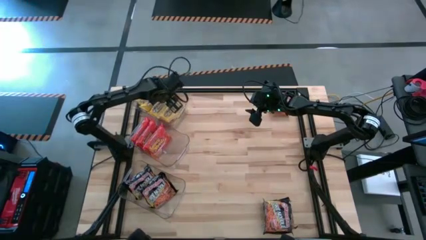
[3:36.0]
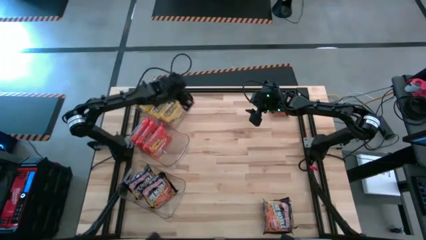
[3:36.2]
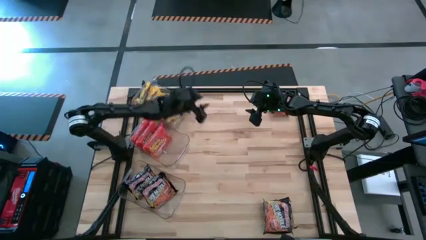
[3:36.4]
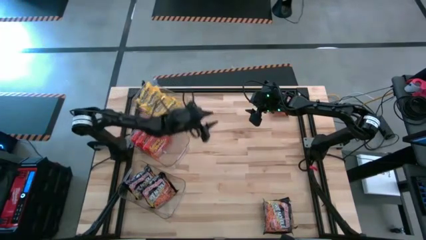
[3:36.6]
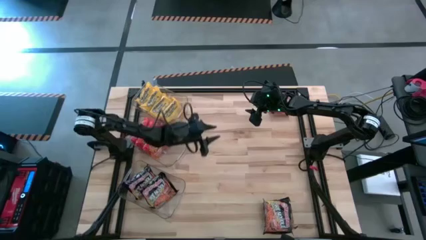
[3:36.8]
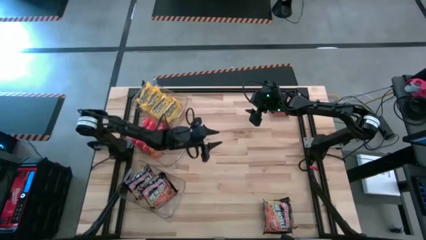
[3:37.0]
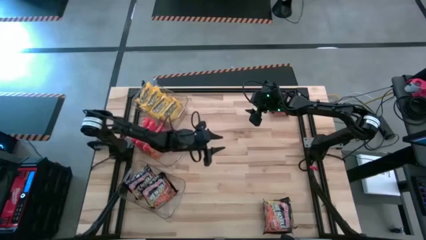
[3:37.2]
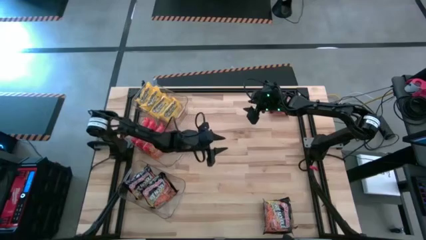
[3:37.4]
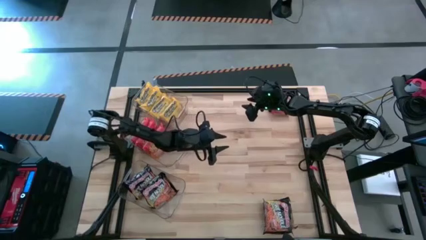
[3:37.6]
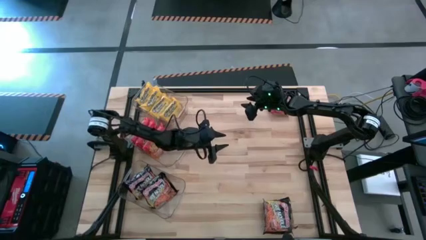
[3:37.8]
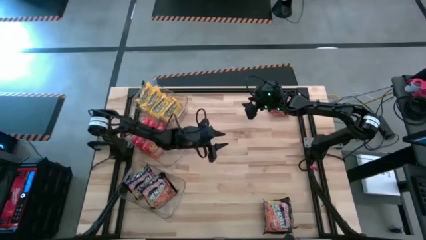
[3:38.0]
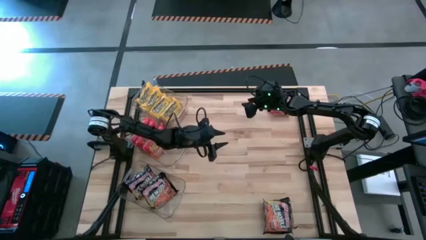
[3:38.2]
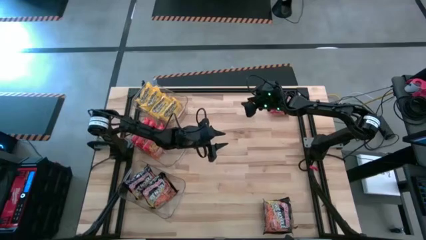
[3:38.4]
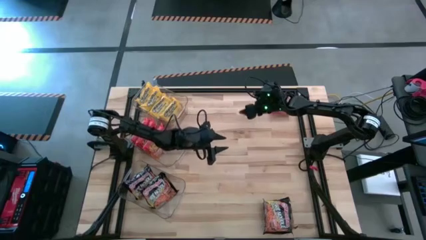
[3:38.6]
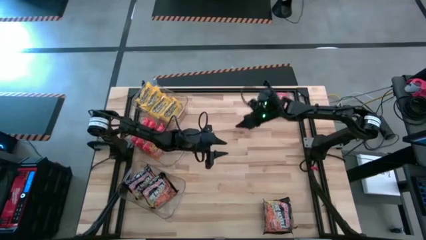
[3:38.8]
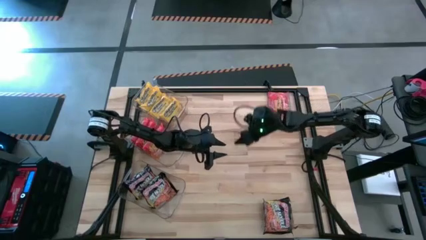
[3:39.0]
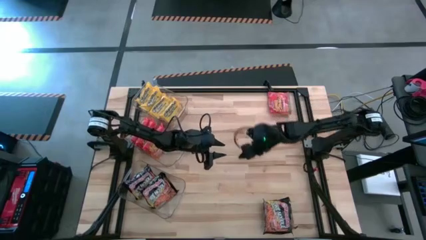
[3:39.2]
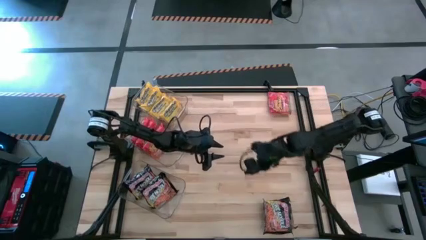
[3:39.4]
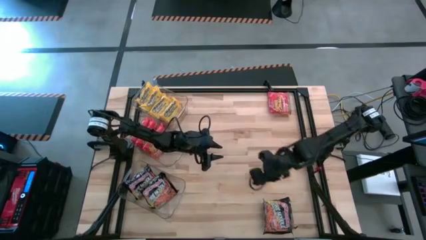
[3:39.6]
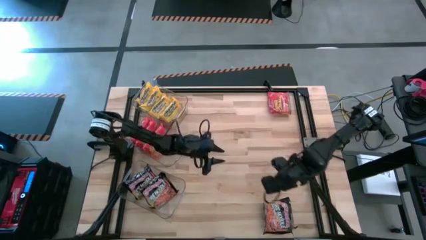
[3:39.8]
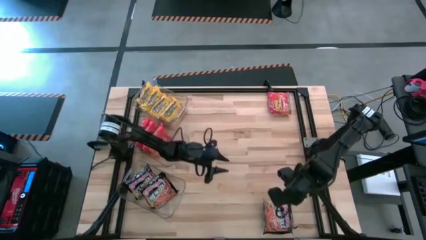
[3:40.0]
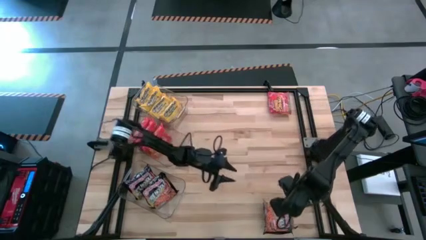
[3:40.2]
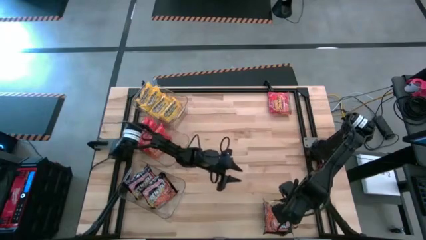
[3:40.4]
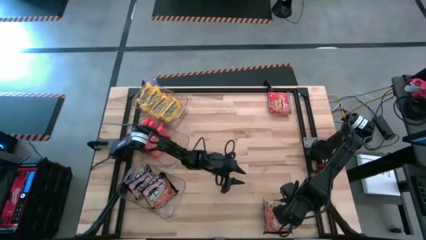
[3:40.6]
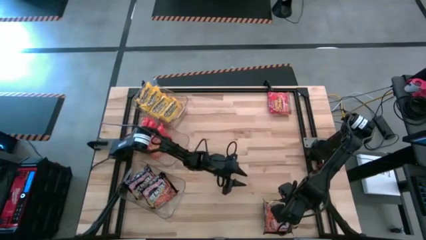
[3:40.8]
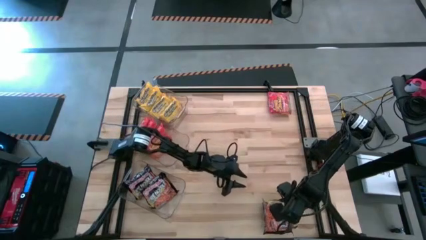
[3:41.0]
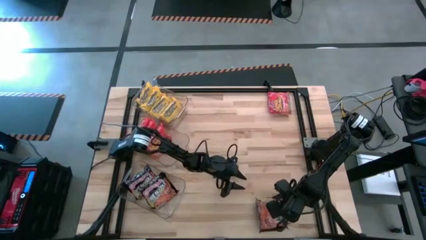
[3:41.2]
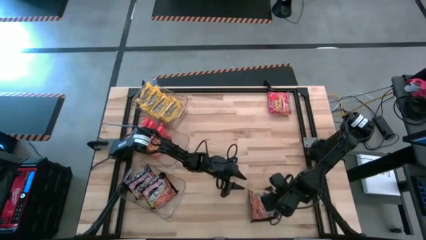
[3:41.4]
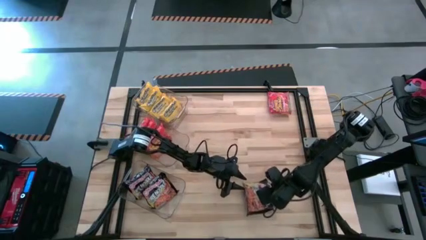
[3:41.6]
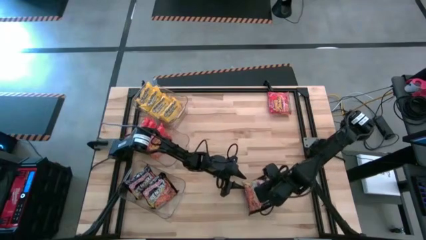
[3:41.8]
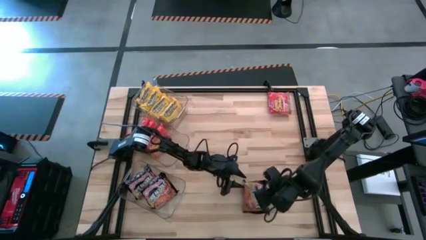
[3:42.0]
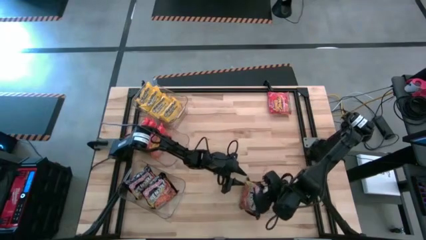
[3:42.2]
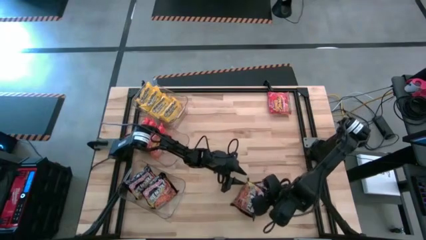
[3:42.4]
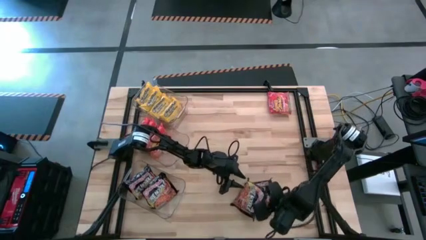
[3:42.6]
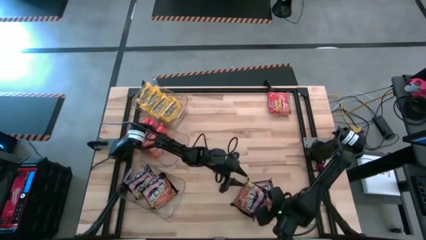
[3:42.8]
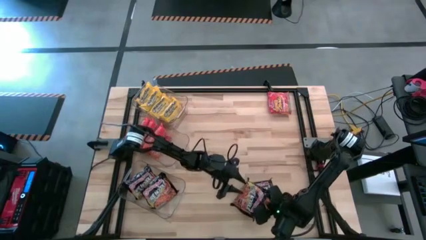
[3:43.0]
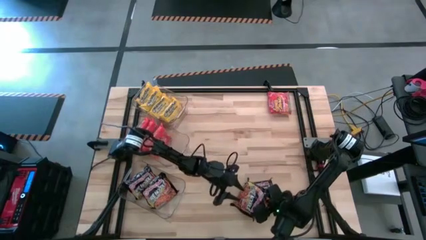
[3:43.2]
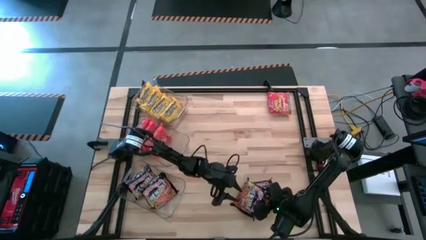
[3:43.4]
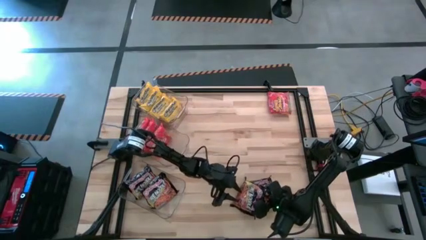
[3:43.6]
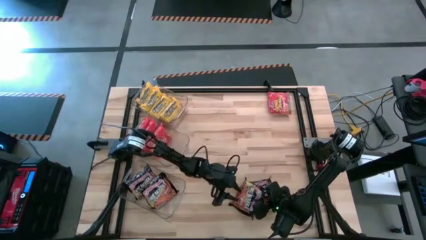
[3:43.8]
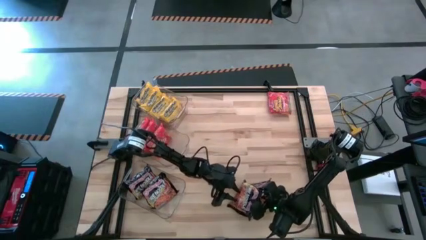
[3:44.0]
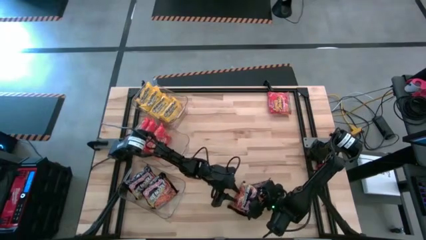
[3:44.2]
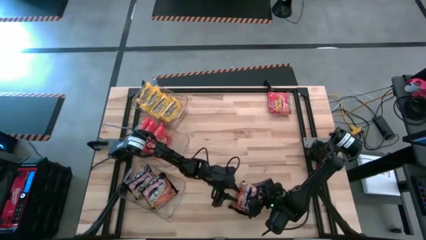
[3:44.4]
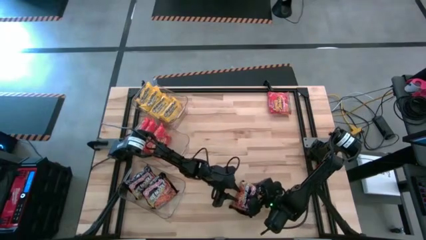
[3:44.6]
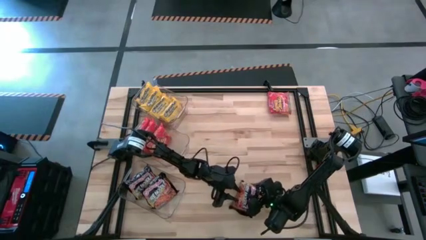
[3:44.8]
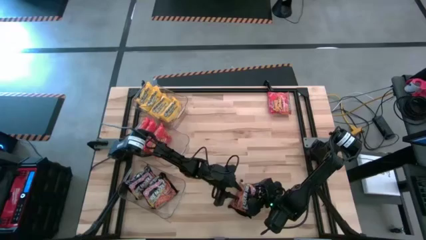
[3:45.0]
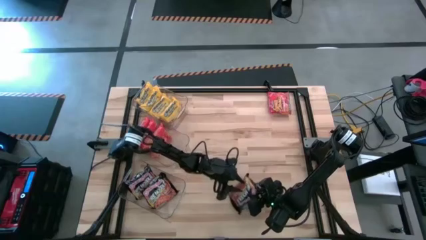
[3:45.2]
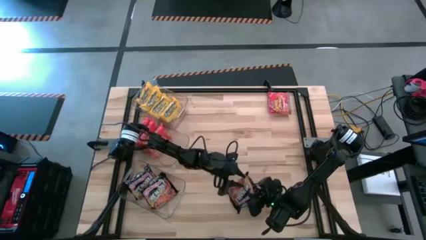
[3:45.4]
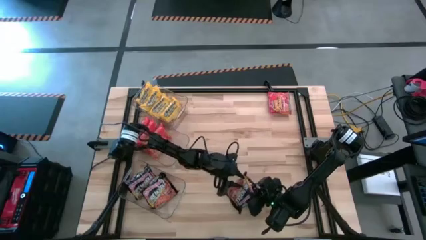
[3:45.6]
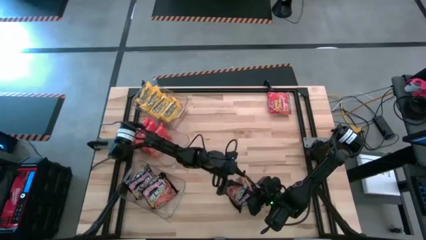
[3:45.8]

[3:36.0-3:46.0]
Task: Sort Maruchan noodles
Put the black noodles pack into the bottom transparent bin

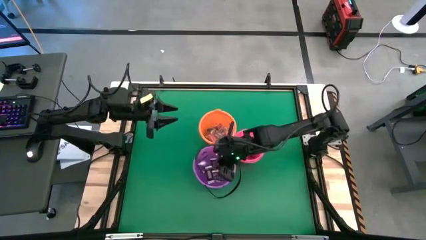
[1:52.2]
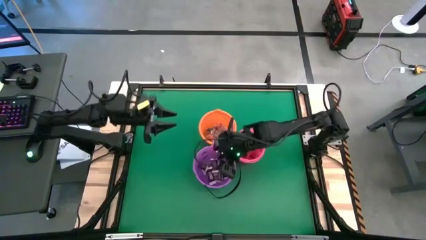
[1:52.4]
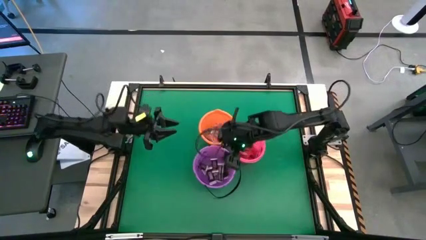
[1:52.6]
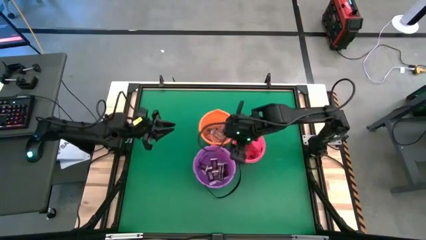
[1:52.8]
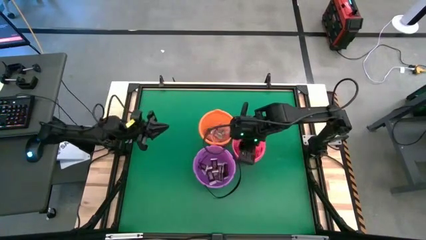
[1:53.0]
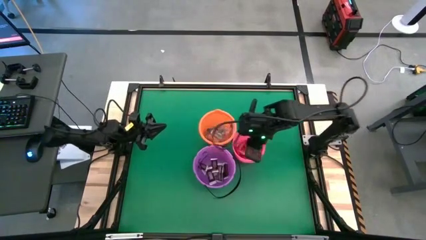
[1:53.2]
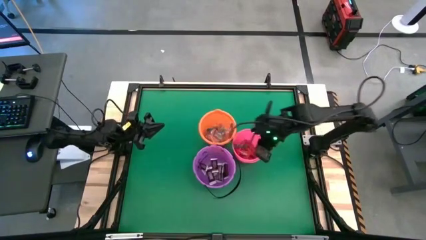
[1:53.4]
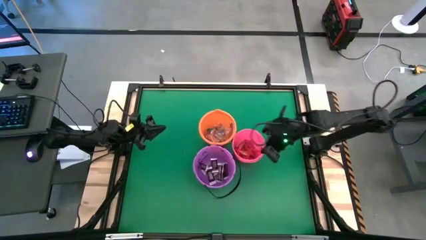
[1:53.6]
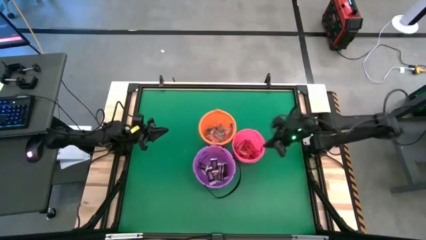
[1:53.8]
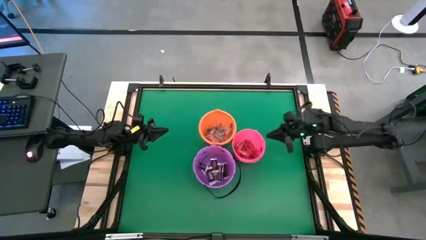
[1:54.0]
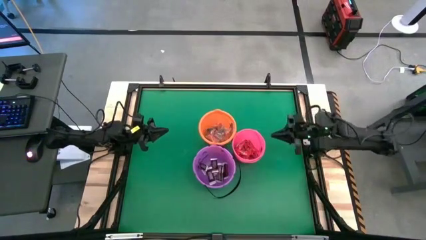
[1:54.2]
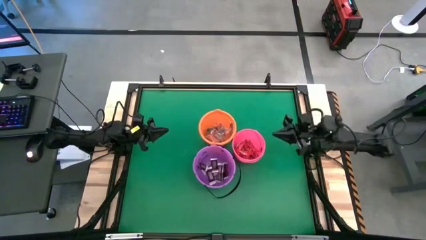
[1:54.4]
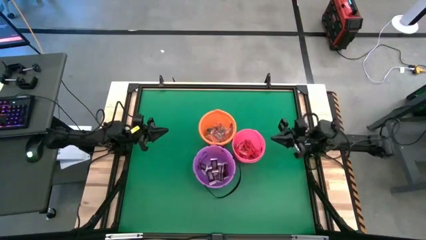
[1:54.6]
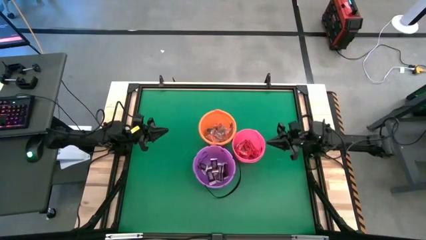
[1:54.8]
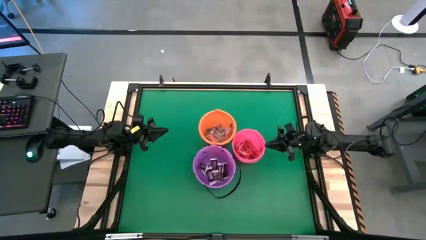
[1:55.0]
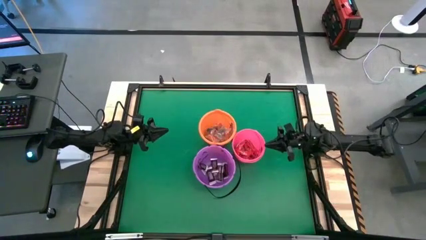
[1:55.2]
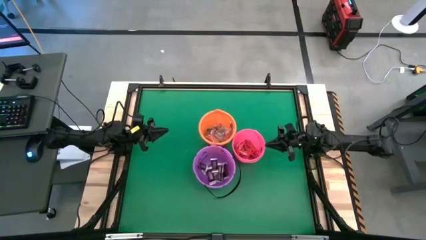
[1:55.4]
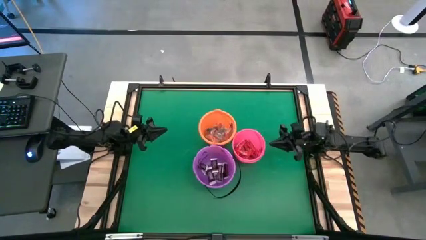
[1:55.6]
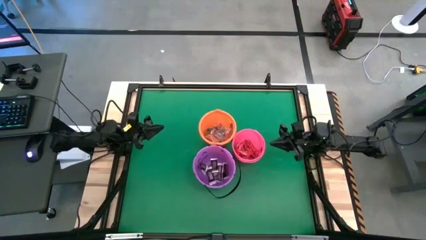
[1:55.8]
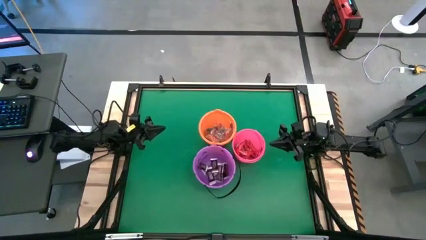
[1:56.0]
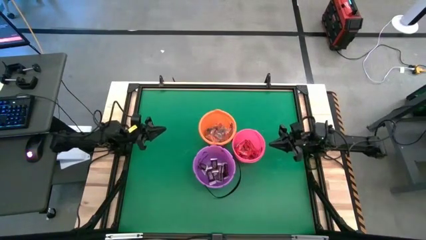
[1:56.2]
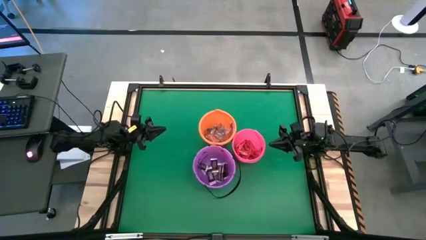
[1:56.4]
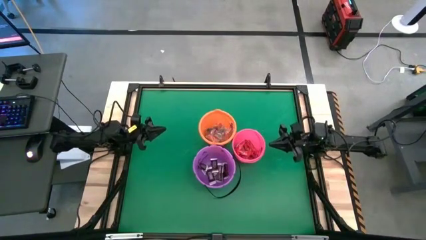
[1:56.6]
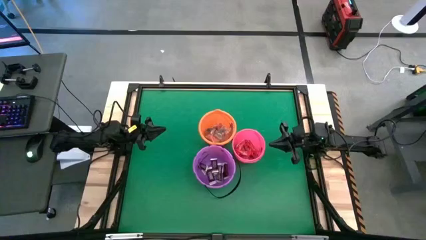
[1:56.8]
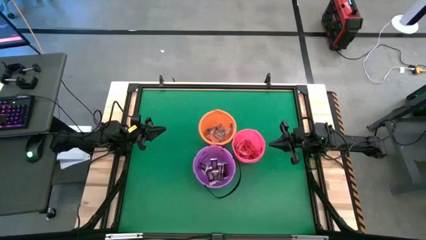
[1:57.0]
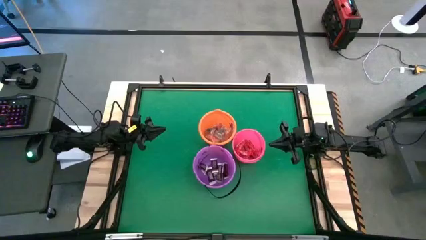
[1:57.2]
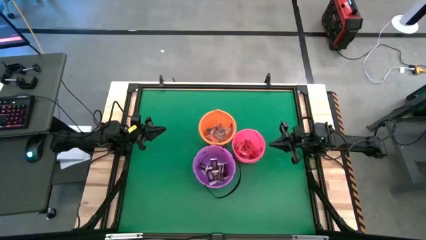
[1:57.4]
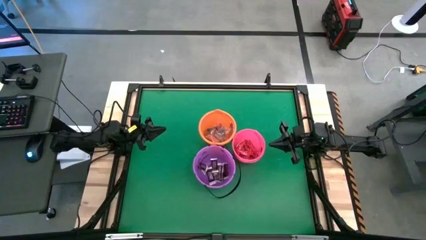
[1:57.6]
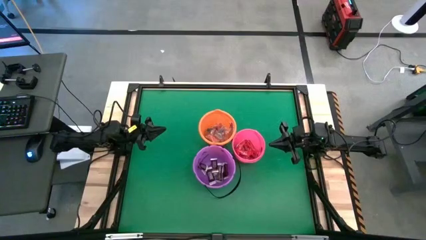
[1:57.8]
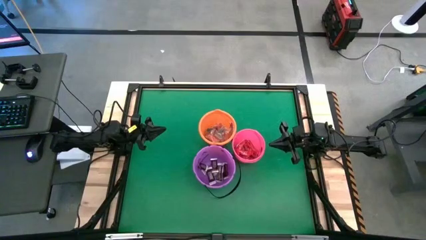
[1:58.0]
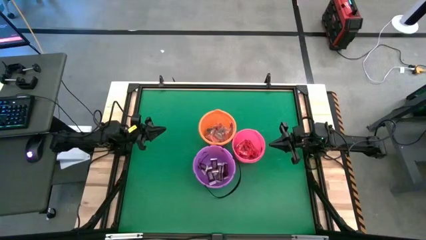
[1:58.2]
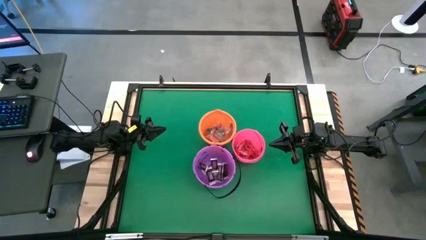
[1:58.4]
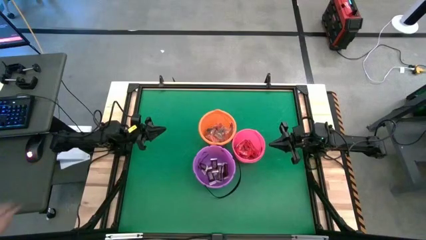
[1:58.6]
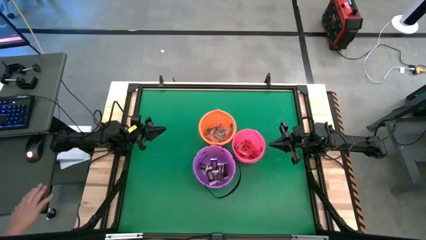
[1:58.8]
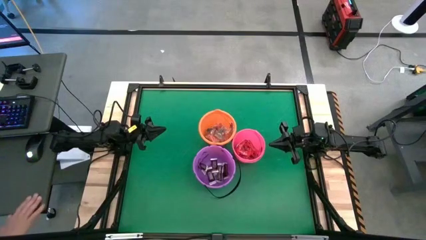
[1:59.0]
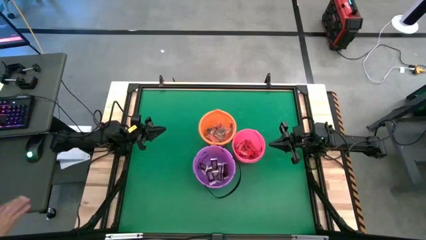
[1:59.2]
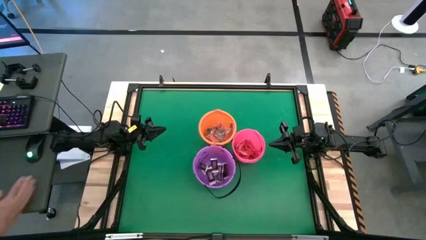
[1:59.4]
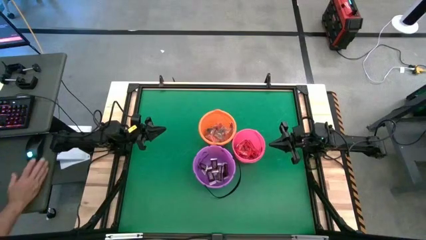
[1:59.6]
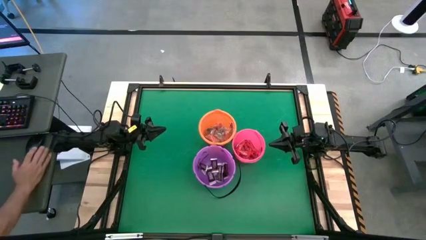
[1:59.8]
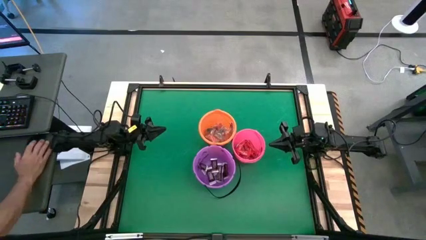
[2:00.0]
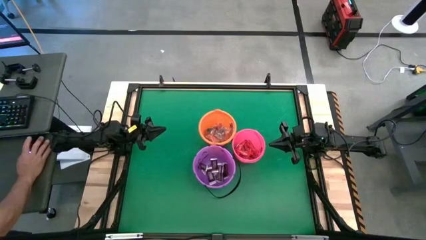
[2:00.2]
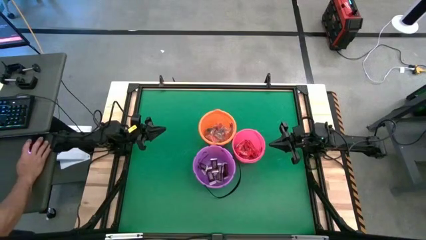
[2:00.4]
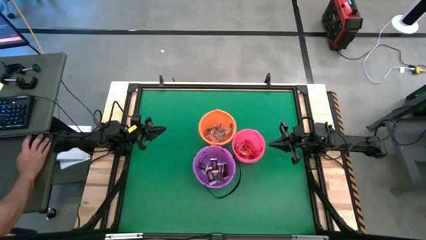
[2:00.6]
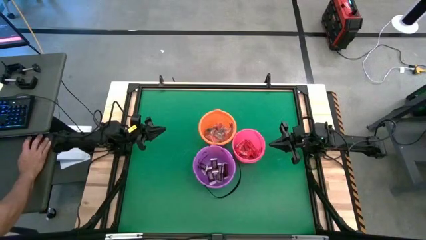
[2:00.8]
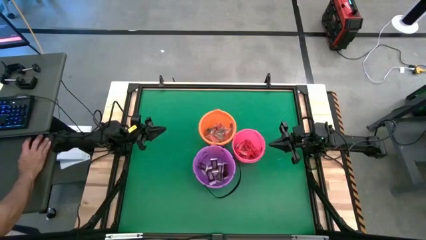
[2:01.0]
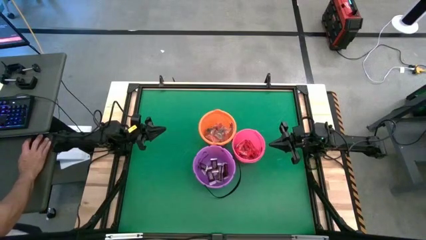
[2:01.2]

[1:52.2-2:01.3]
Task: Sort candy by brand, put in halloween buckets
Return to Home Position
